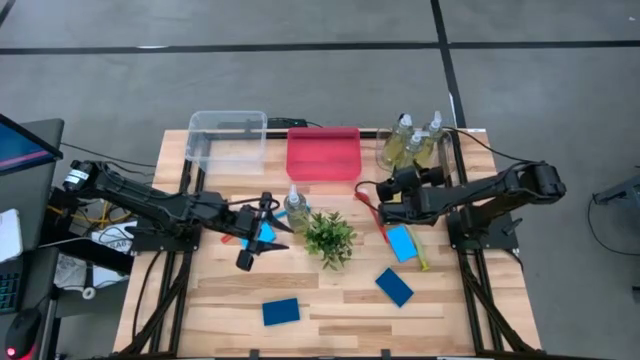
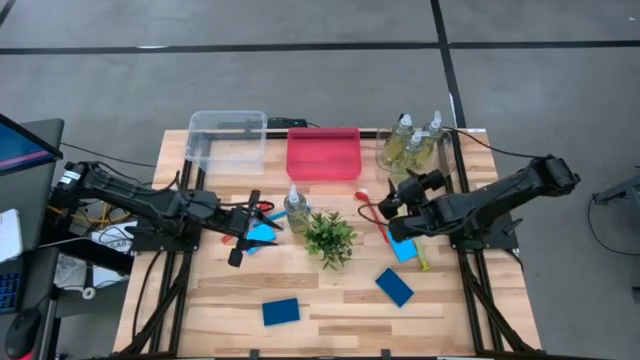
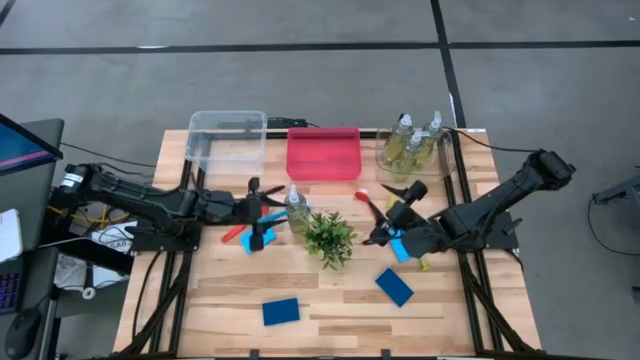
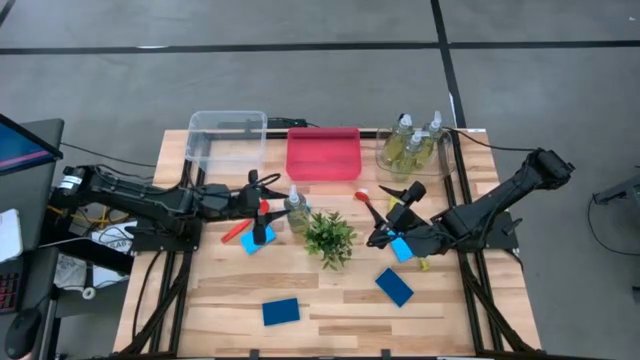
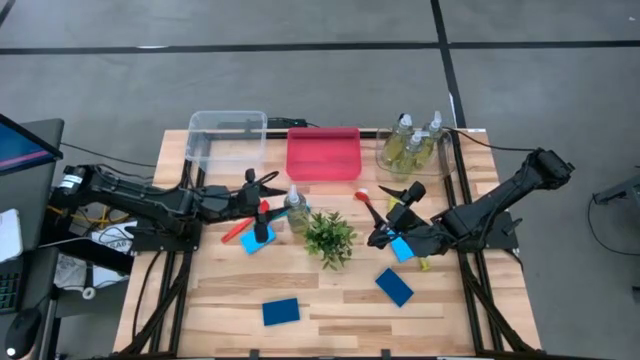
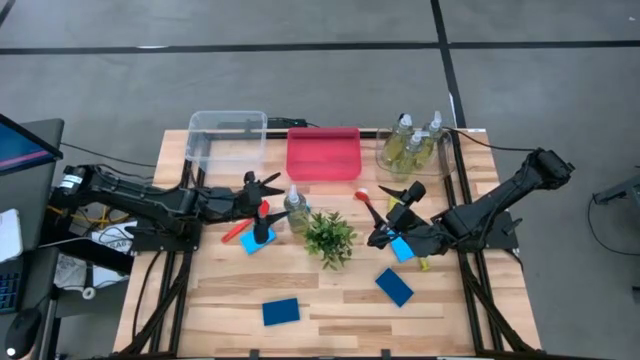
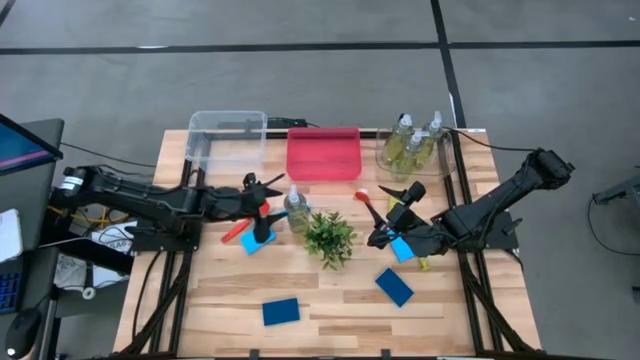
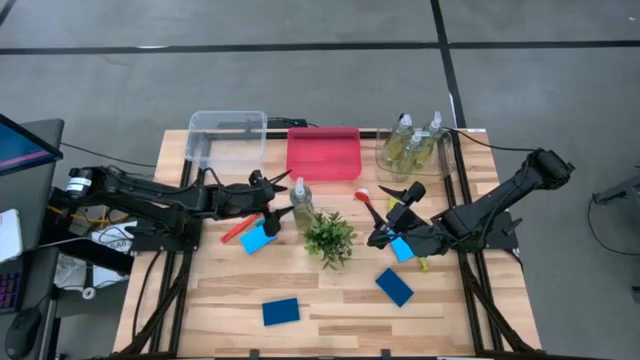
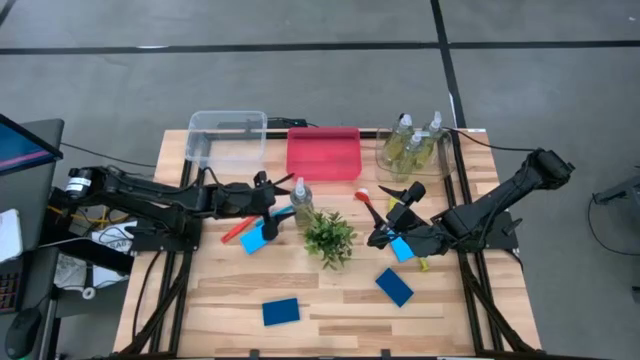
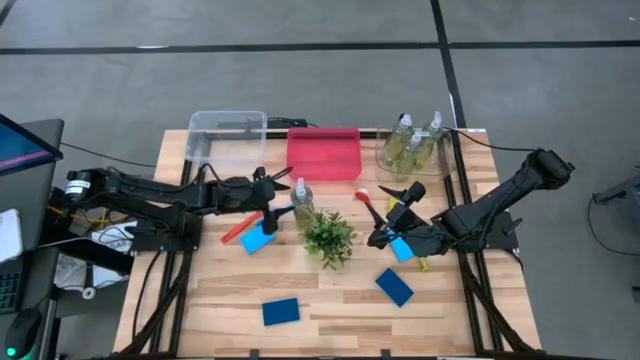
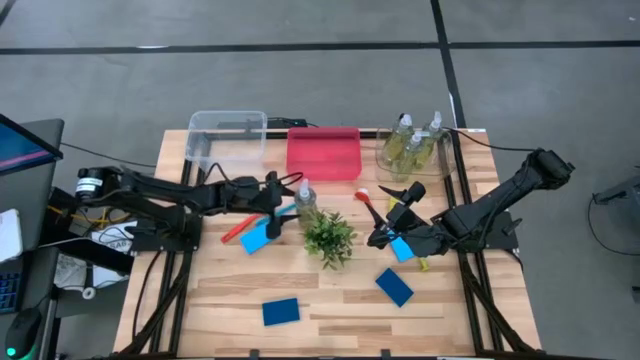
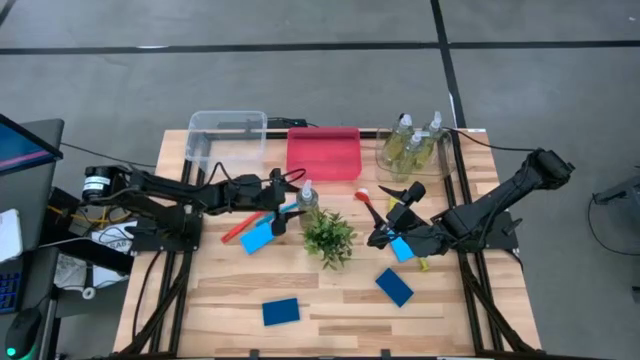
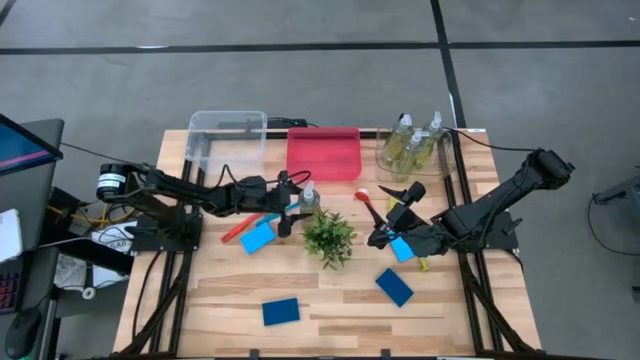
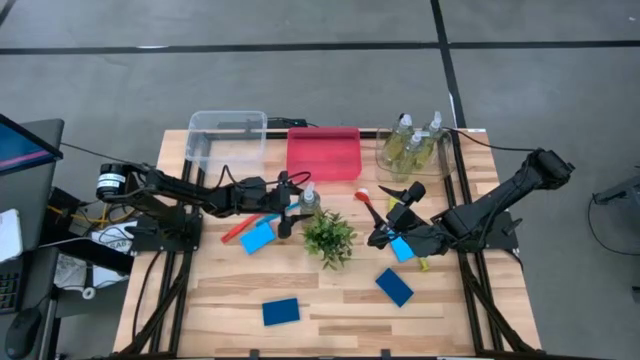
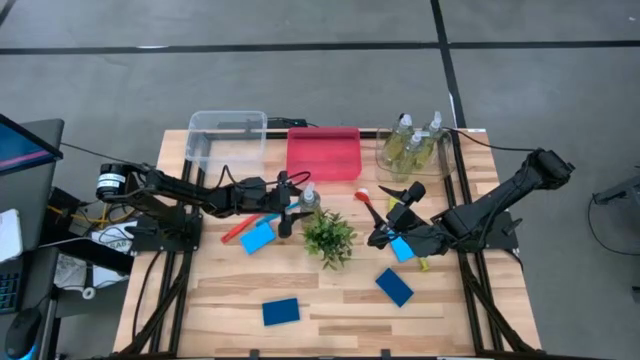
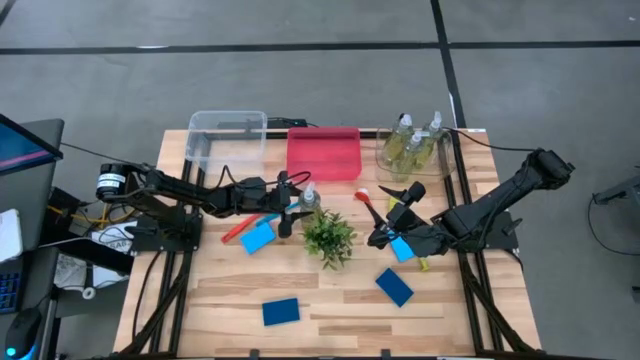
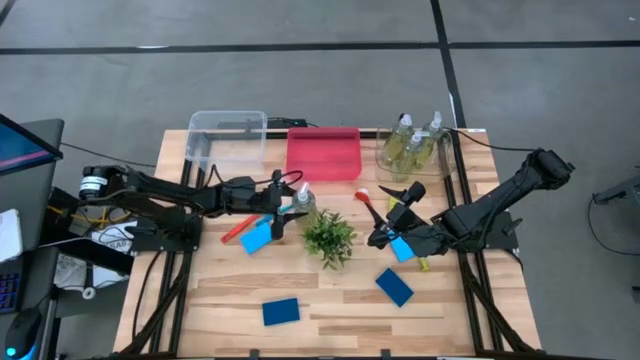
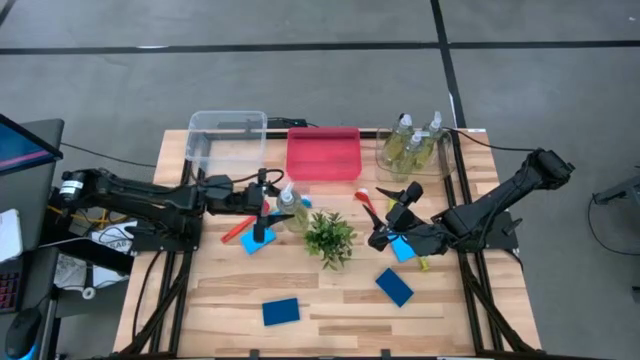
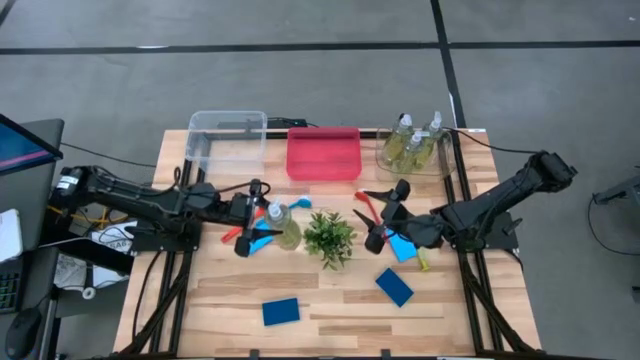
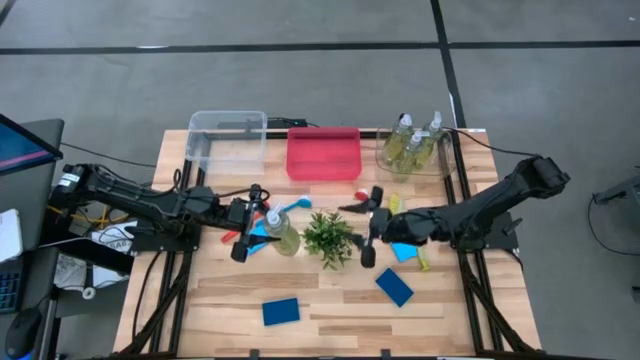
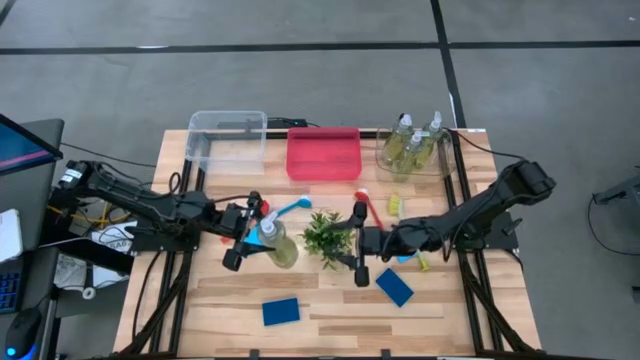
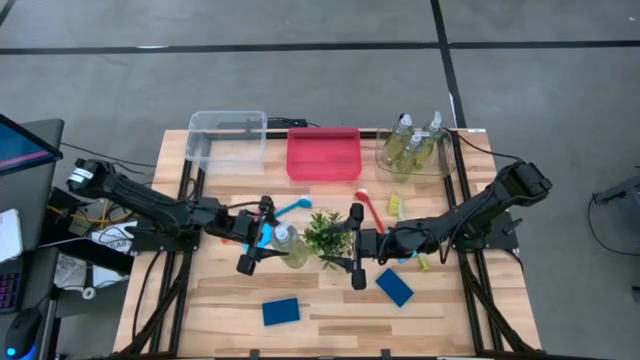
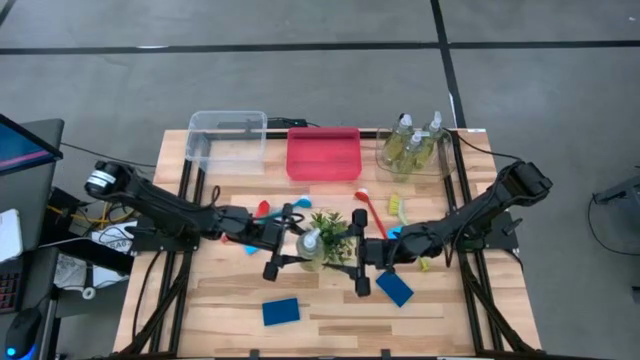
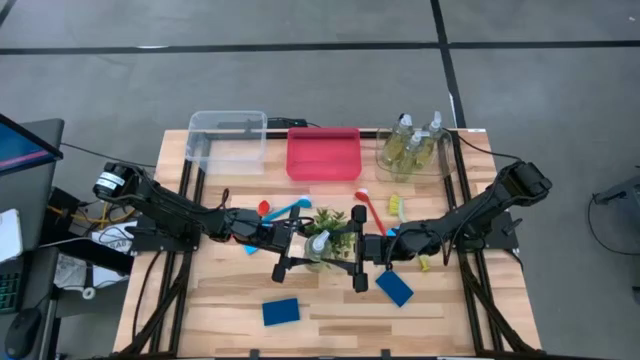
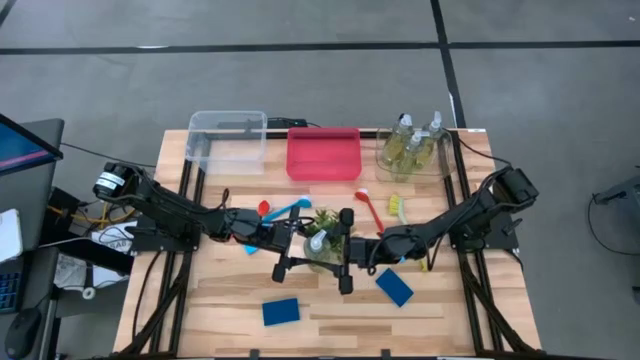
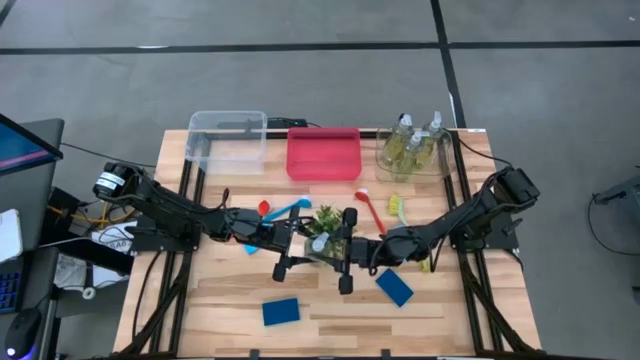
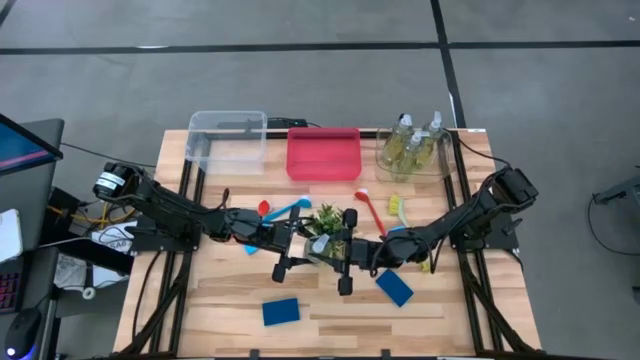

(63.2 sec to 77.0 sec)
Task: Pick & Place Kitchen Sink Supplies
Put the green dishwashing liquid dispenser into the right transparent bin

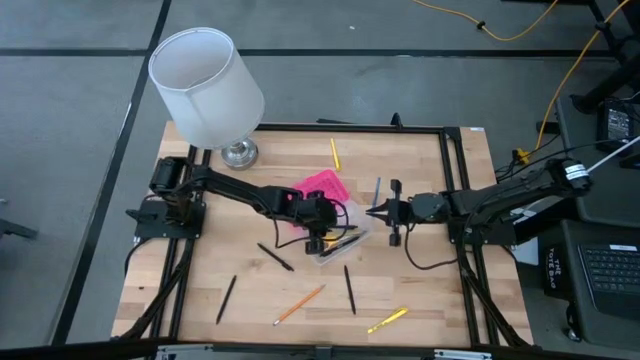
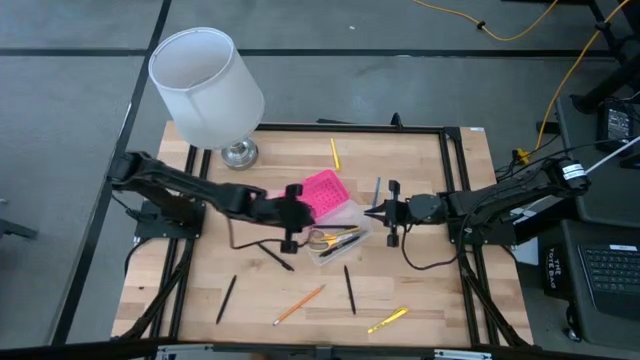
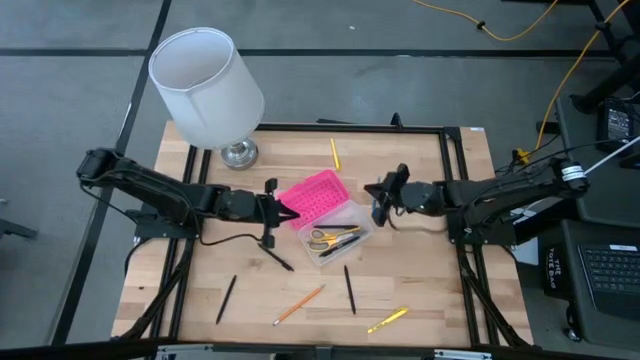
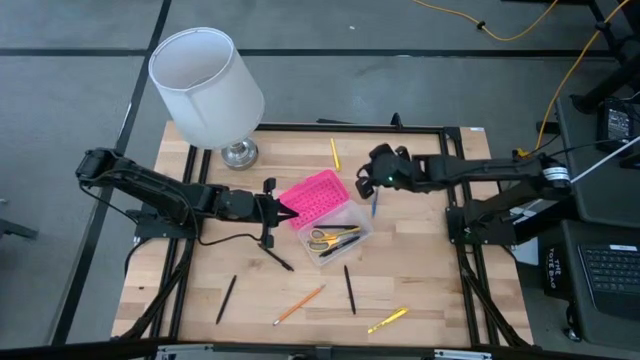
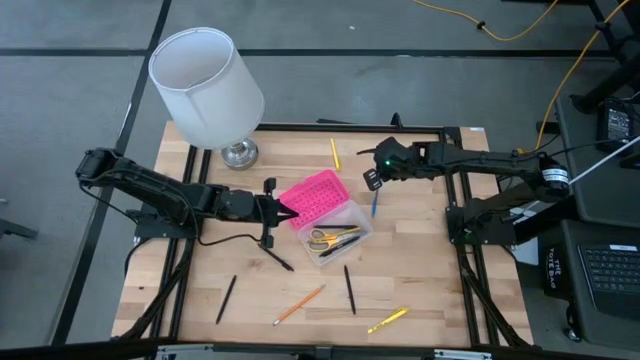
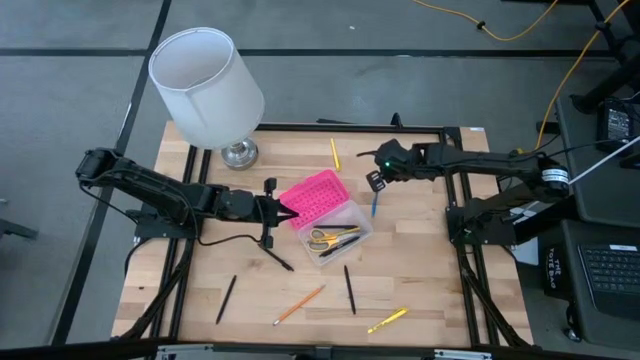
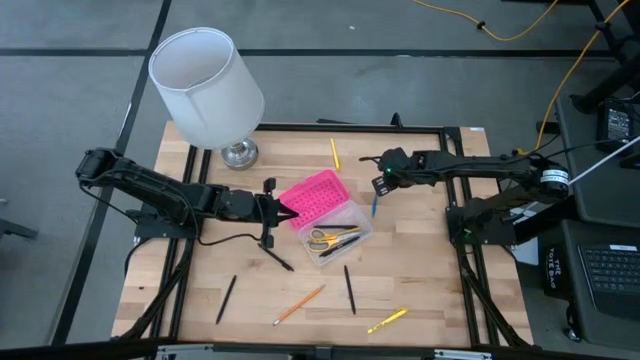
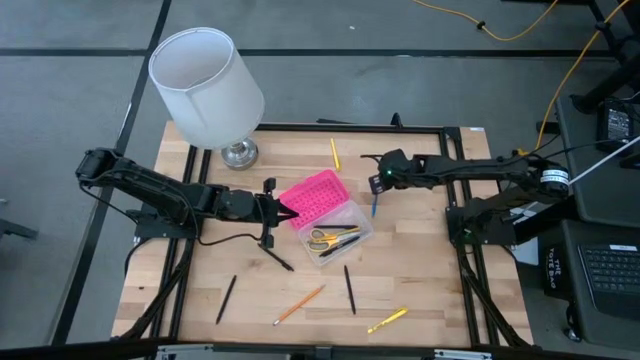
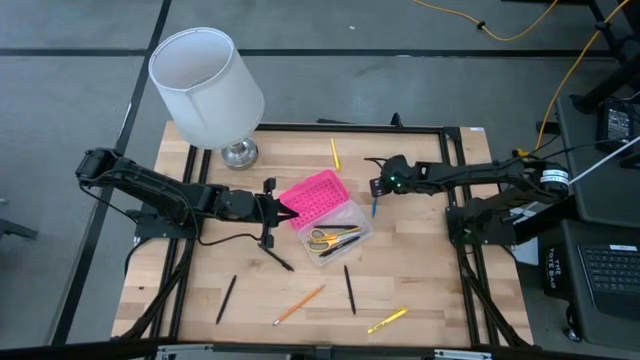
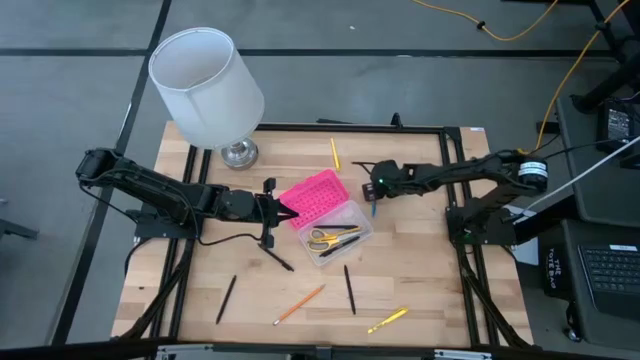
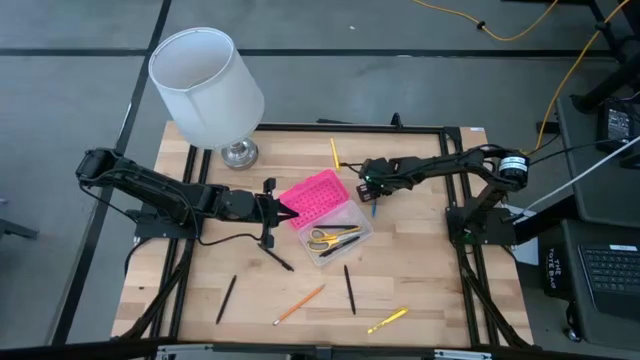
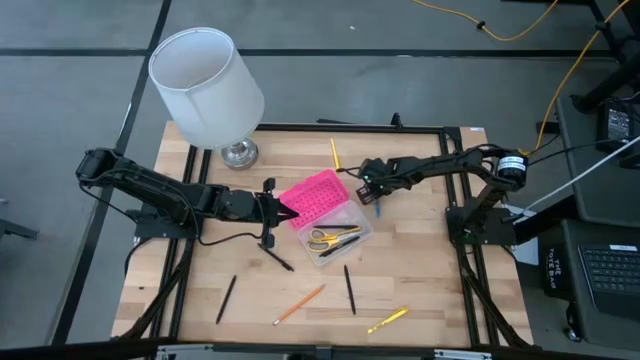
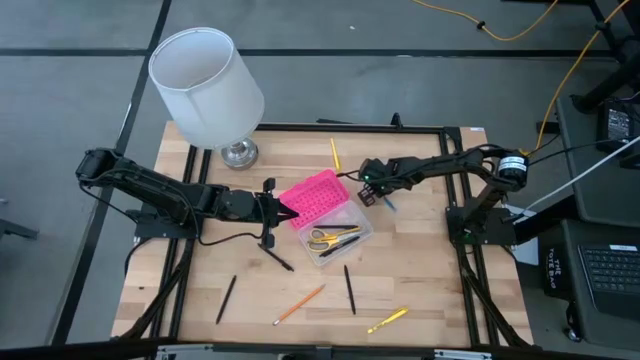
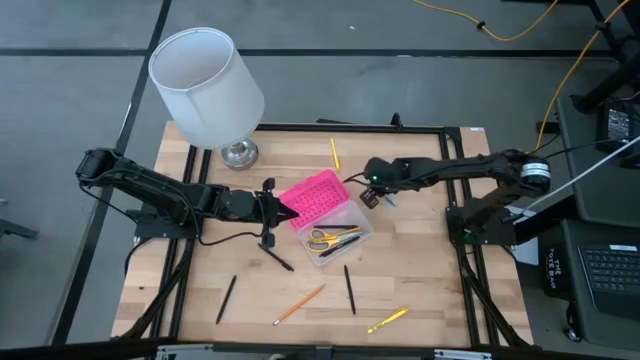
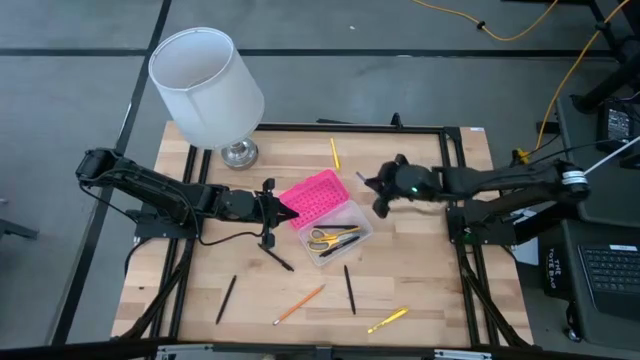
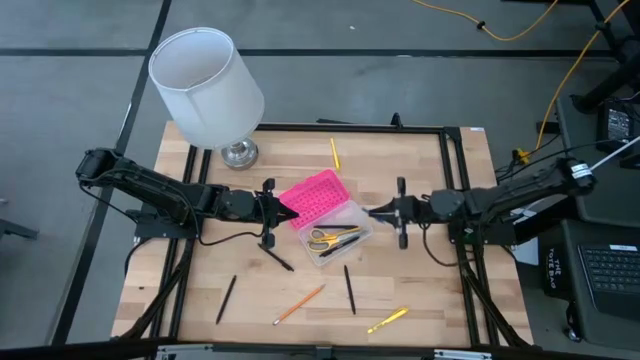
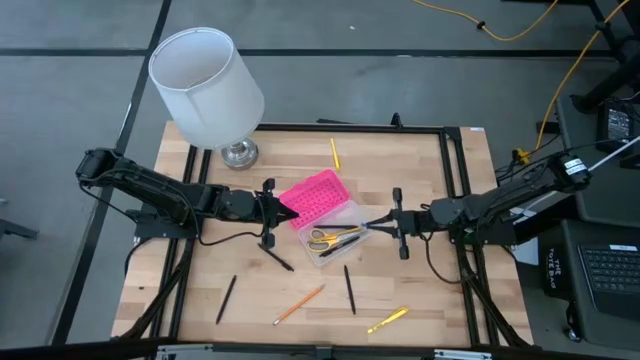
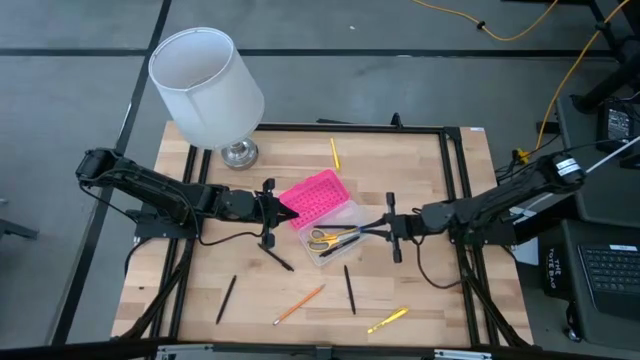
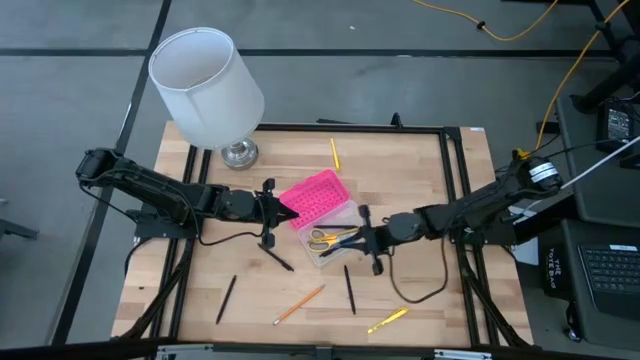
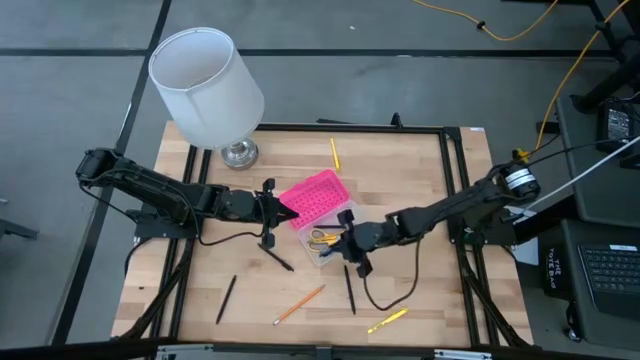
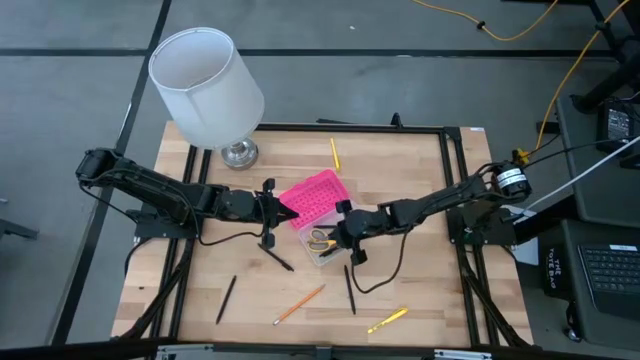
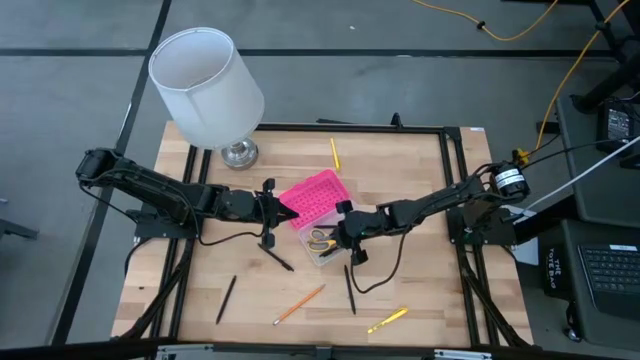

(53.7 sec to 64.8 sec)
Task: Pick & place school supplies into a supply box
Put the blue pen into the supply box
